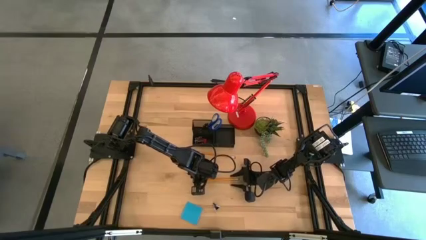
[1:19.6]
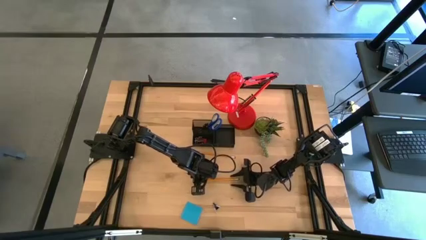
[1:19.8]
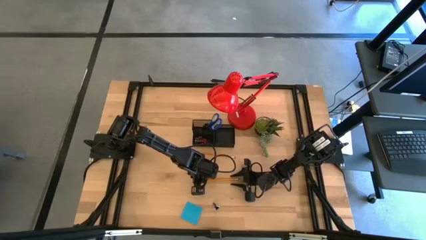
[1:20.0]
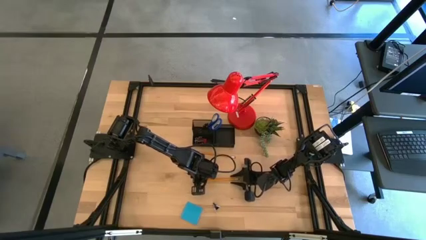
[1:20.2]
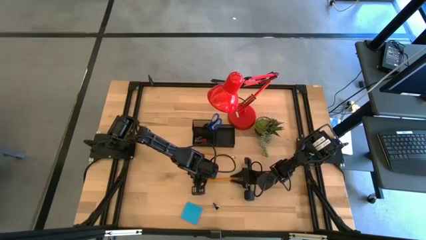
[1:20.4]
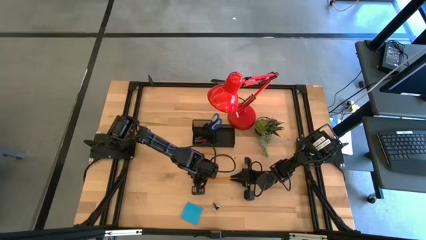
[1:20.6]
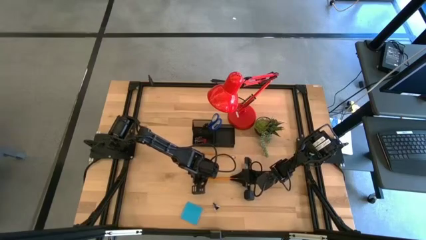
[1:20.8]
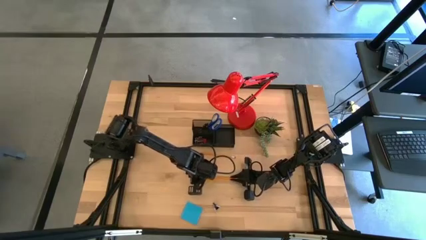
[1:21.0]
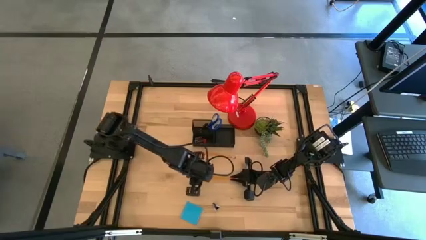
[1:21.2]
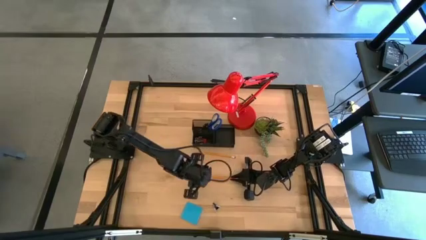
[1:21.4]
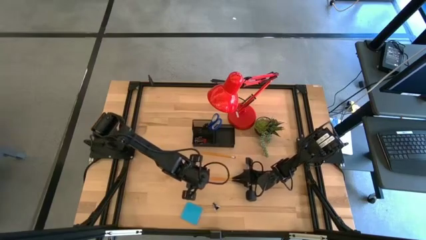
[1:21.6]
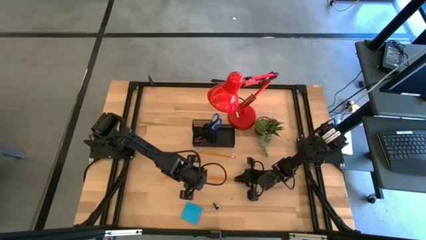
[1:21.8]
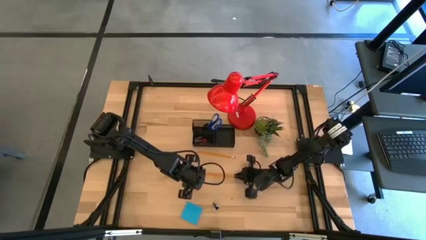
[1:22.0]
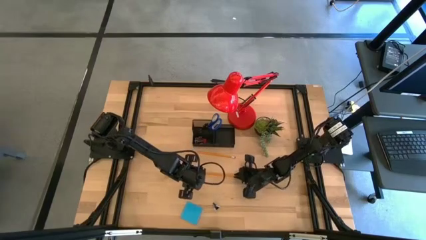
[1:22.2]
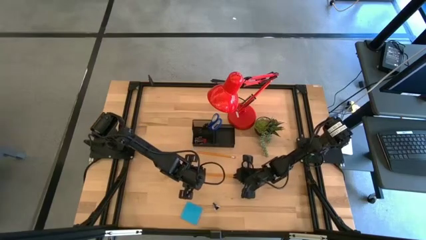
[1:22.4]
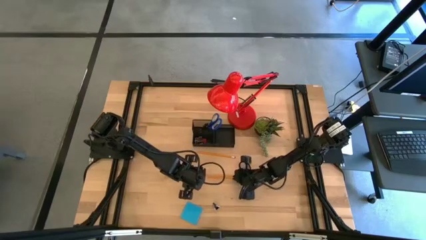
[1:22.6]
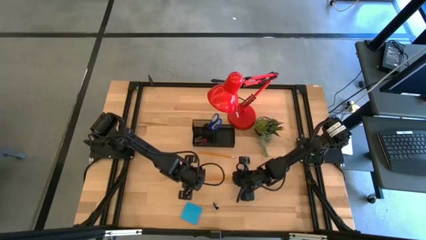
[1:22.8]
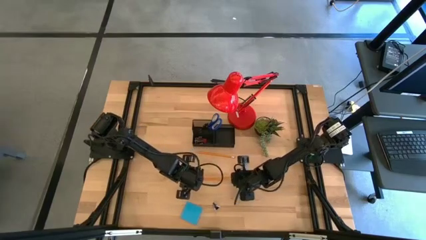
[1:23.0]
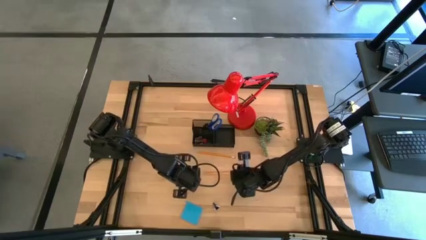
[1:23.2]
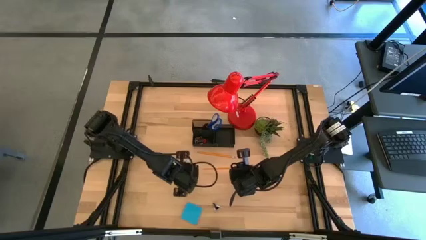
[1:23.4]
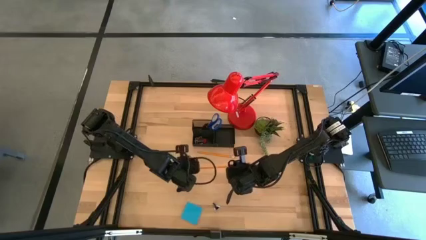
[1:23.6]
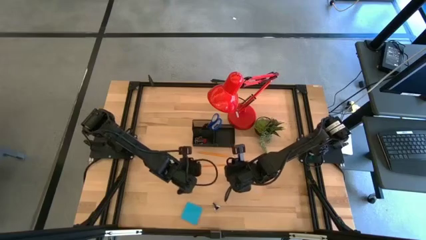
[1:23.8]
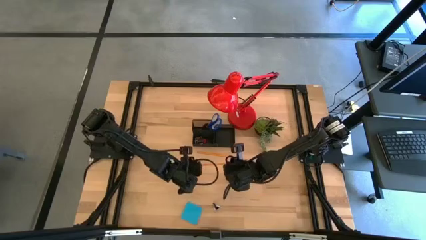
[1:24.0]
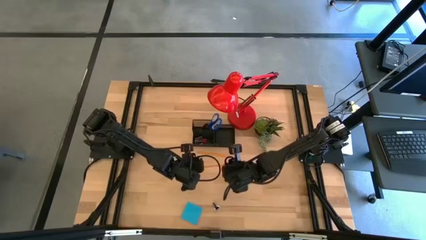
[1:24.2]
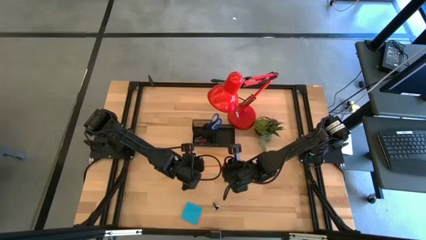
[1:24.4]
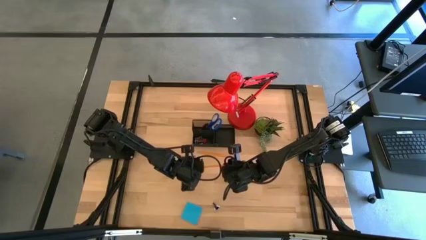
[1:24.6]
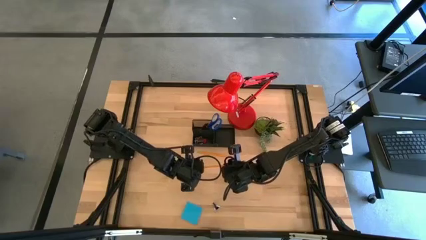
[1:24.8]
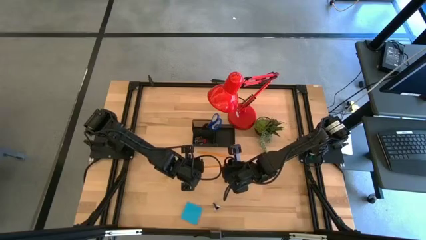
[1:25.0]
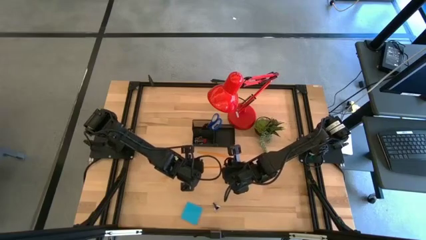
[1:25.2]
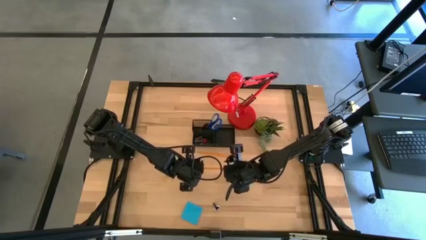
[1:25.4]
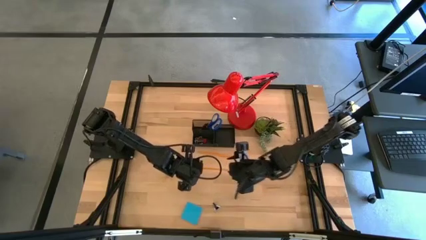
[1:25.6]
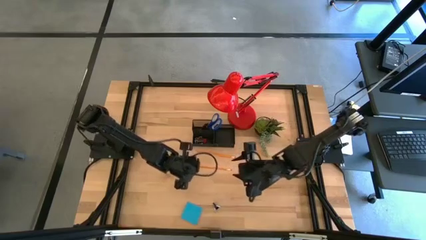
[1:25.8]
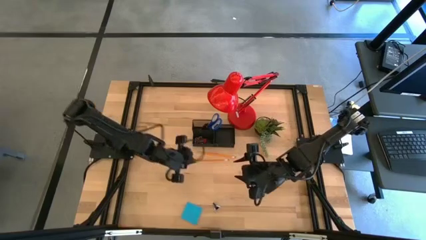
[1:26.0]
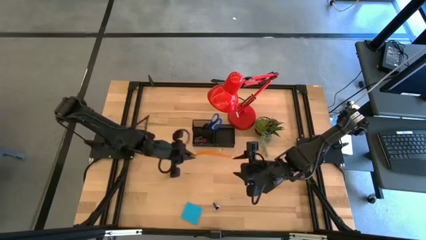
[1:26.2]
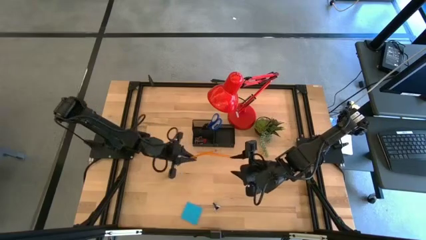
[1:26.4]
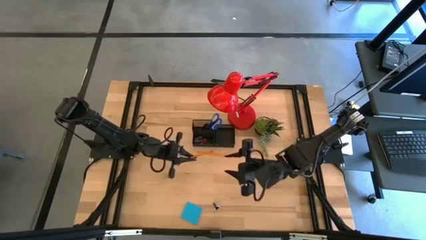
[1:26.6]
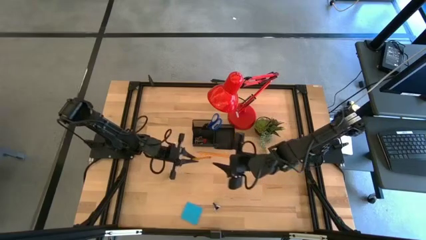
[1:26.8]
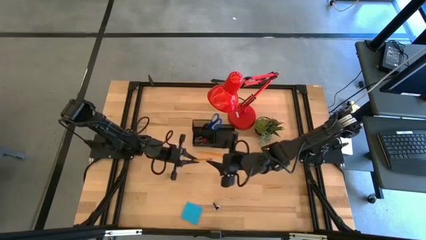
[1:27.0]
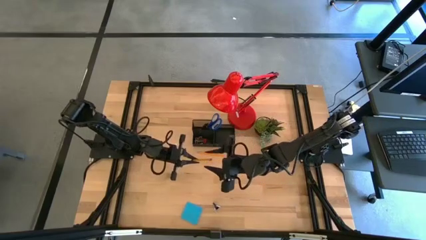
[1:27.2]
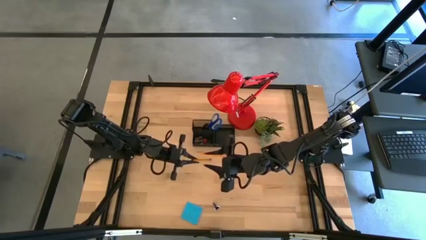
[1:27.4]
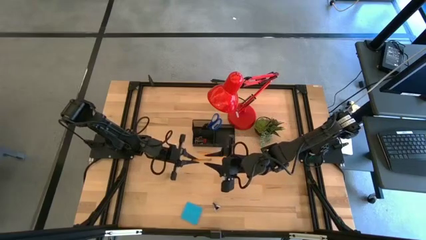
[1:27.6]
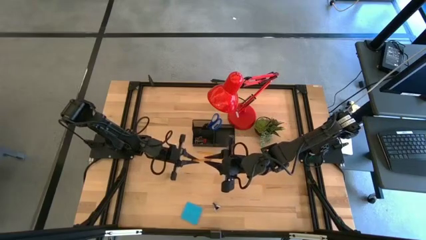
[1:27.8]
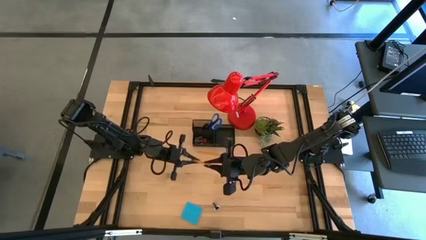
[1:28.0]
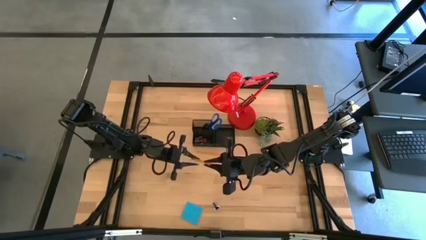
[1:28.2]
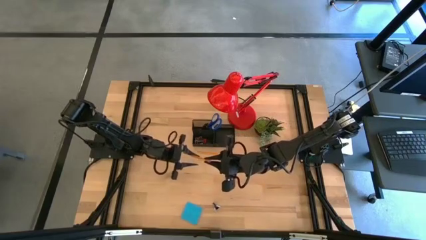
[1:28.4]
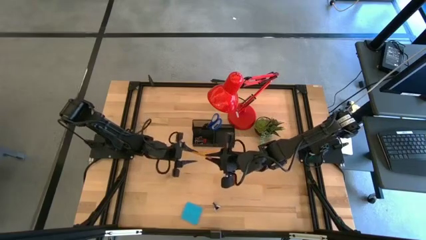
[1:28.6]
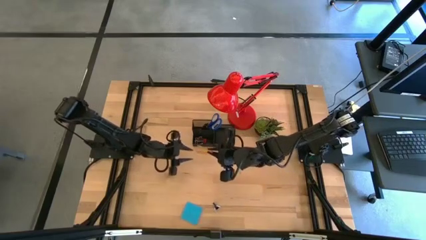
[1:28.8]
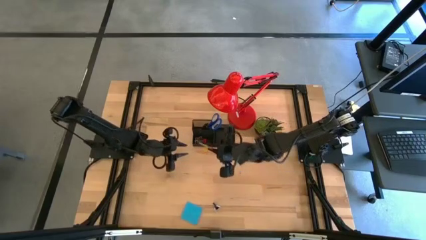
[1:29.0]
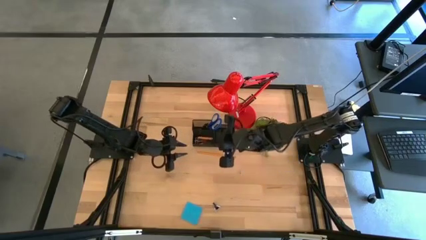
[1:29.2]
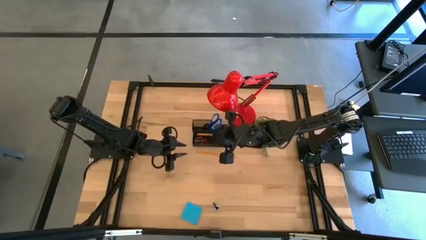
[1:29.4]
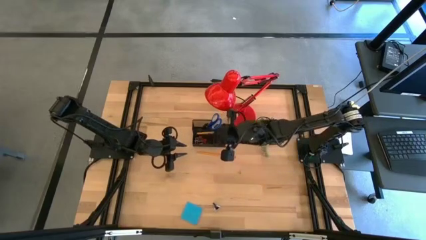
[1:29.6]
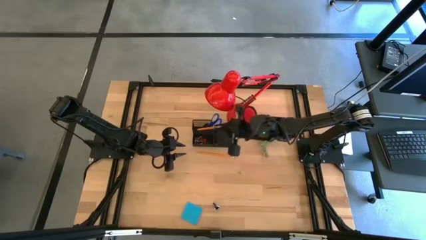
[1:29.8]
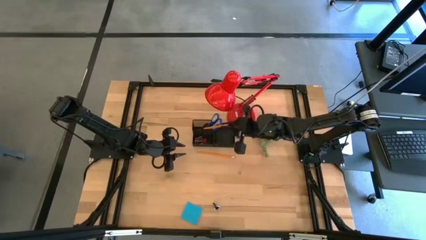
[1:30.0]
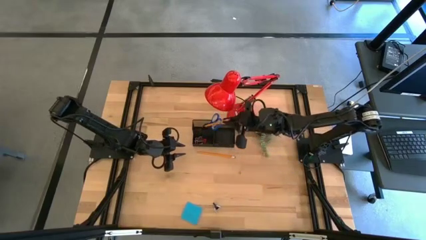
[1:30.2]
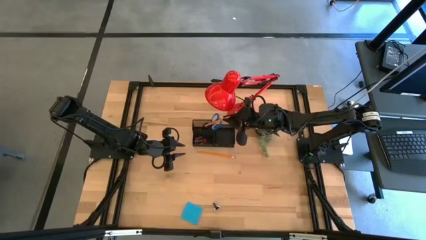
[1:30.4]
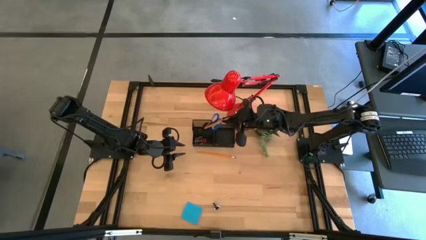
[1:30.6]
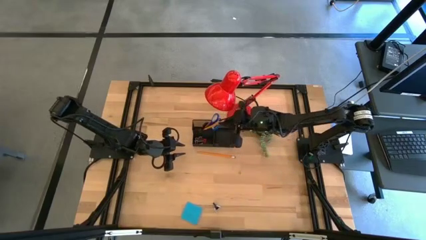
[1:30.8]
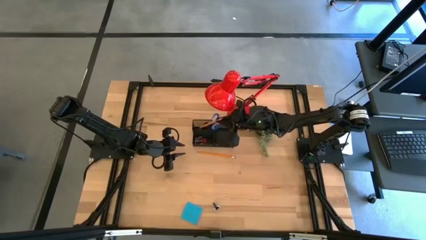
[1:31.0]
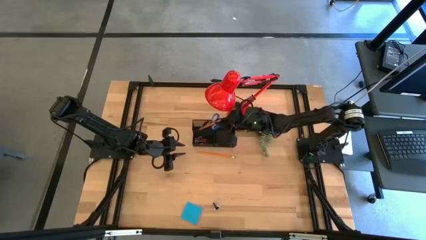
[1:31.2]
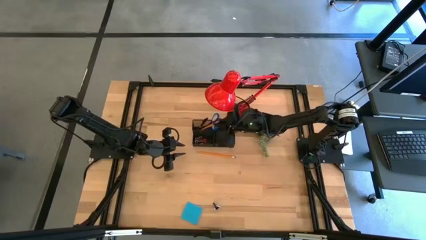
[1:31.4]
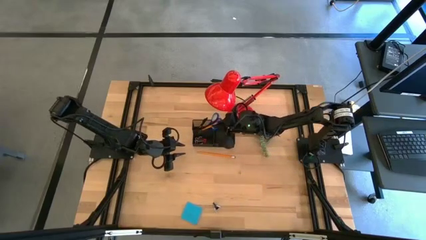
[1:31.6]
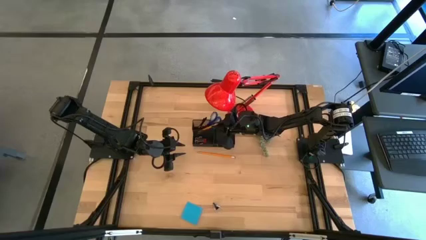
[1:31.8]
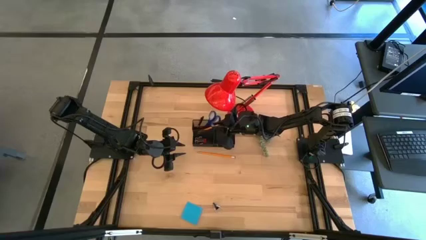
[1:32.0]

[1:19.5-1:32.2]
Task: Pick and place office supplies into organizer
Put the bottom orange pencil into the black desk organizer

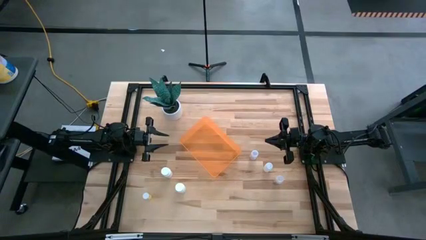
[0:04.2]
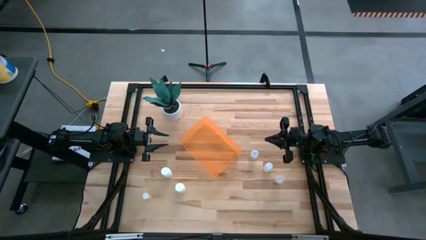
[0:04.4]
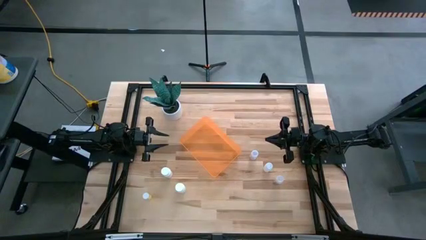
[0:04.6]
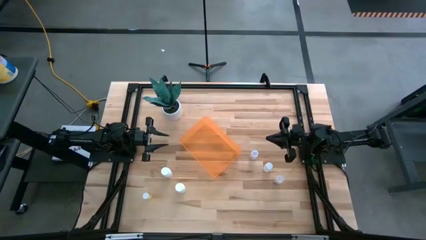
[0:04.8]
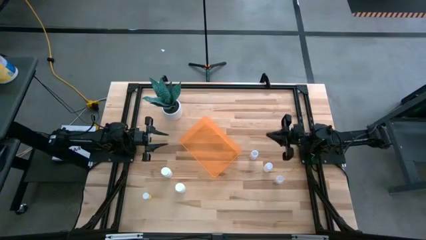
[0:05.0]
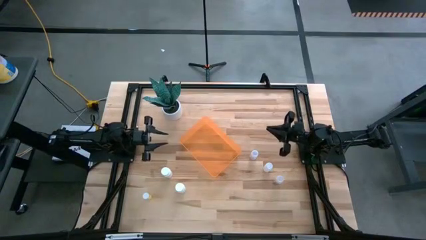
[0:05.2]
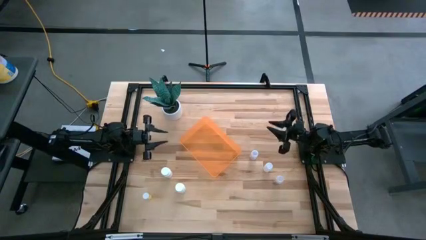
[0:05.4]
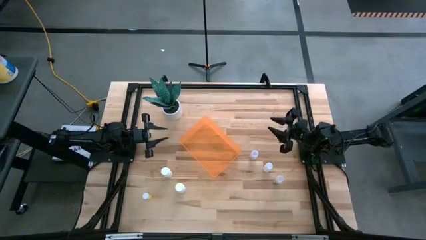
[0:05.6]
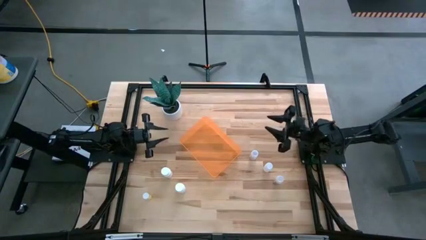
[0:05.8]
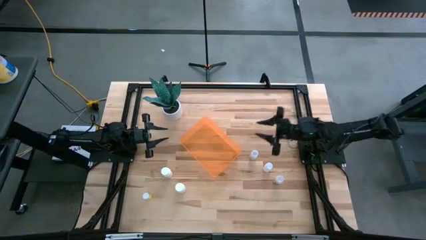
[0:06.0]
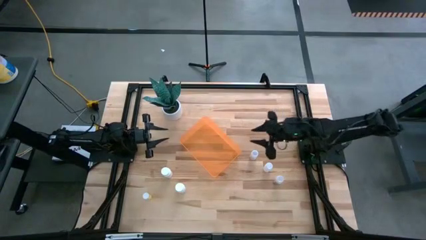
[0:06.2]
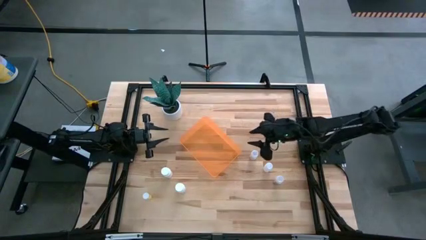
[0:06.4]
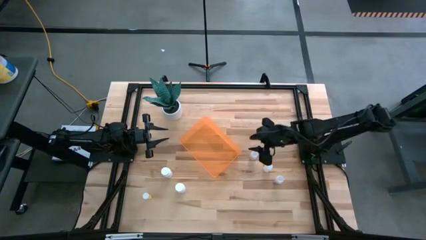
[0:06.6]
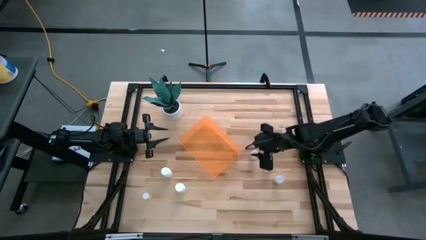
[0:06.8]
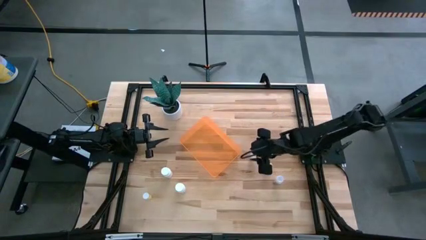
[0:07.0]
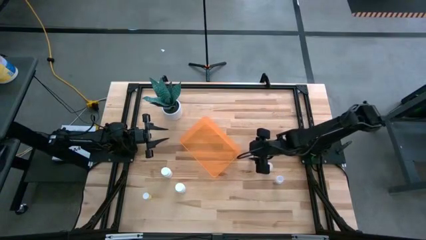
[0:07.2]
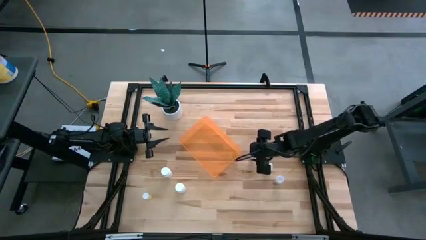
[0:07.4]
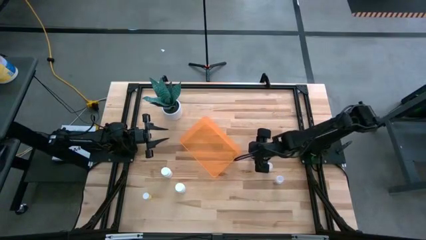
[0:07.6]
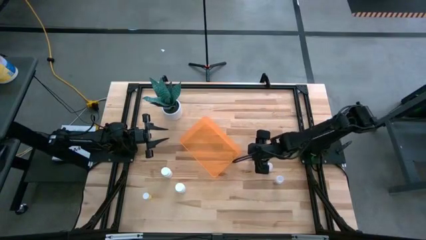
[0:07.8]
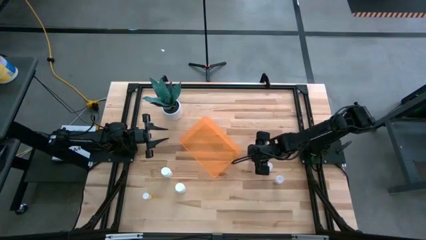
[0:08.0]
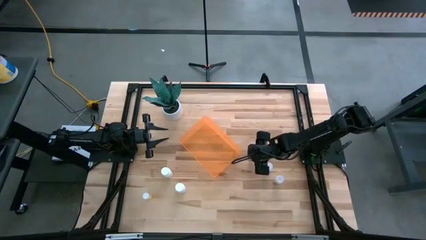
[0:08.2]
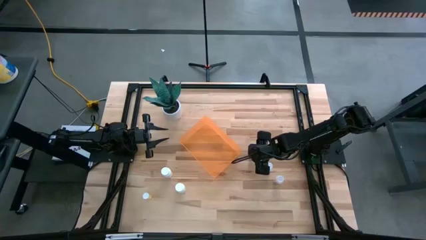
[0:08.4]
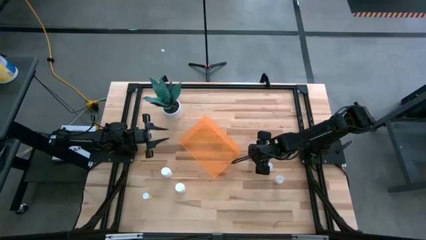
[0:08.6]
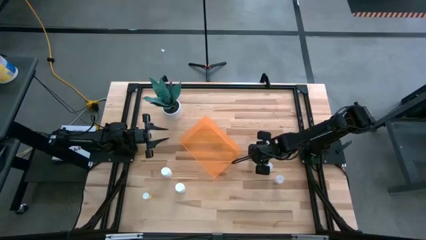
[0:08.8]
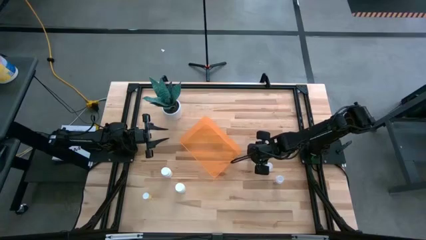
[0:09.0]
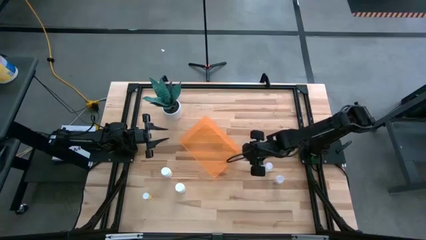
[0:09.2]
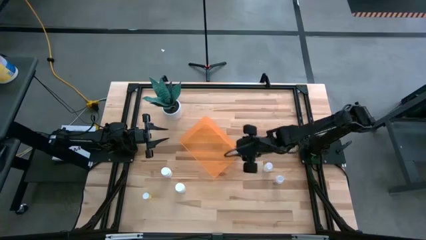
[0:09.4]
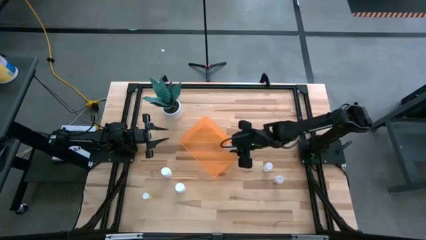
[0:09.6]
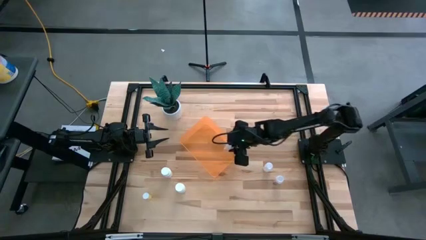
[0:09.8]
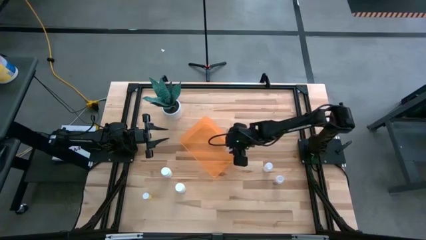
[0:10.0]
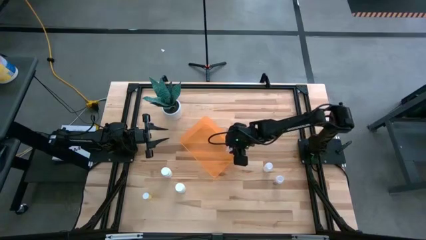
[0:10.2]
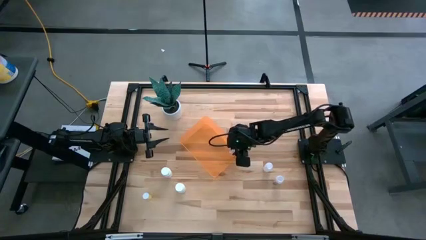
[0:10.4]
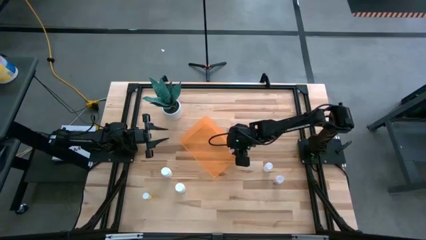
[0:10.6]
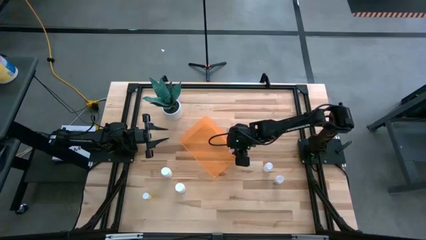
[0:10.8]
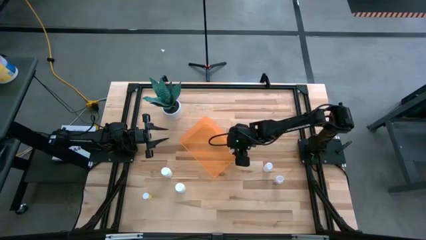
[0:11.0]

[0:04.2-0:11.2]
Task: Pick and place pill bottles into a basket
Put the top transparent pill bottle into the transparent orange bin
